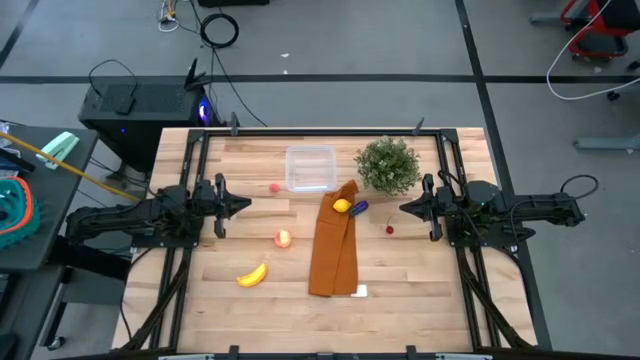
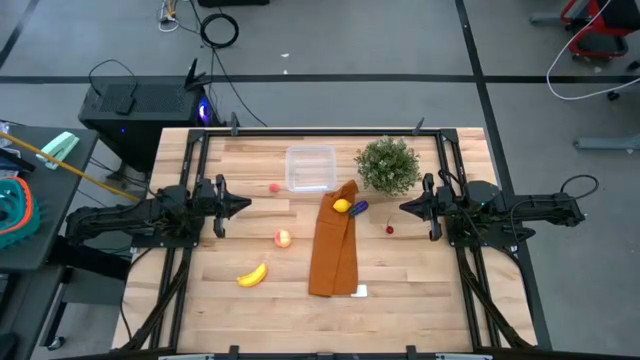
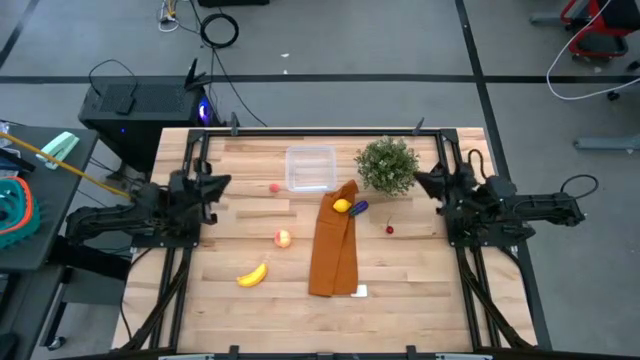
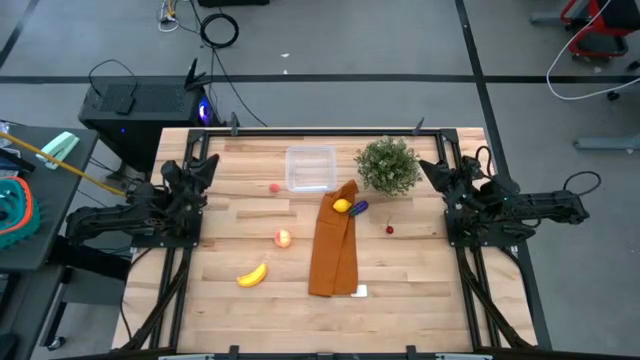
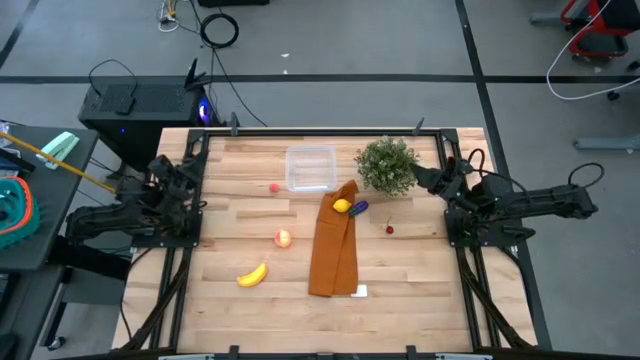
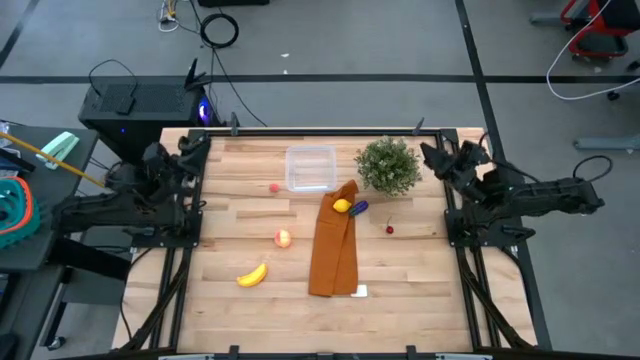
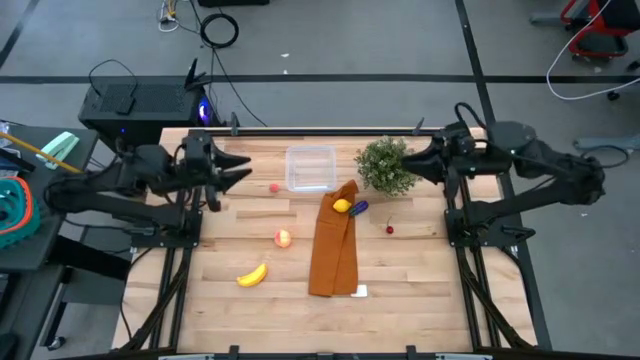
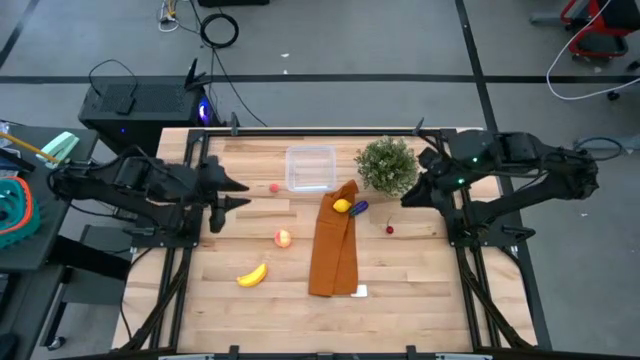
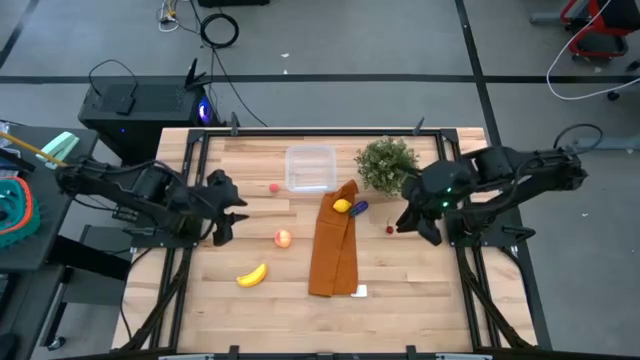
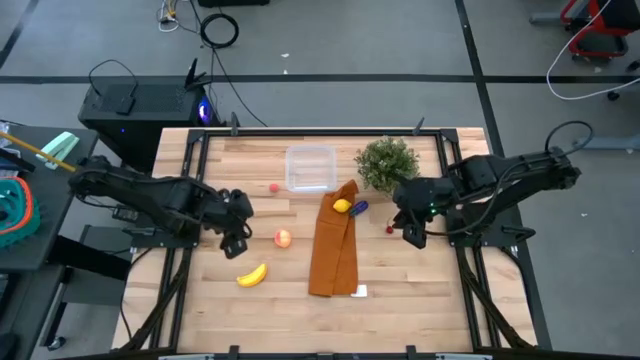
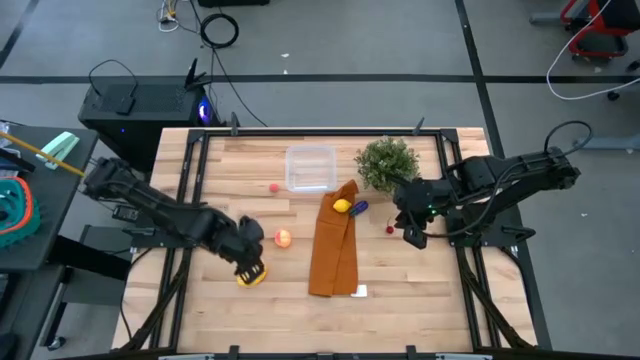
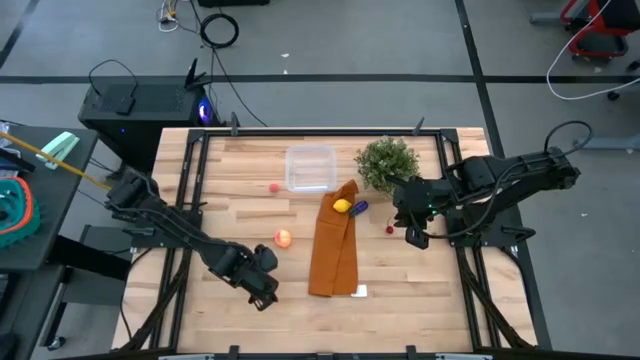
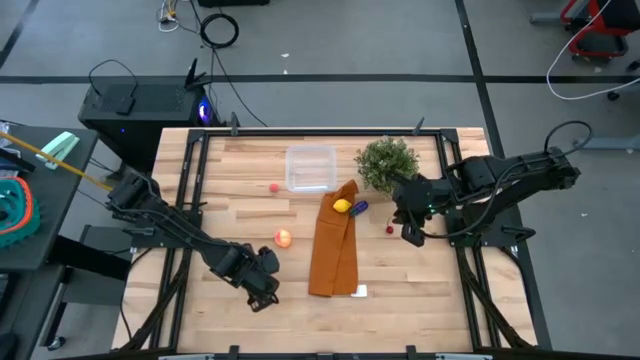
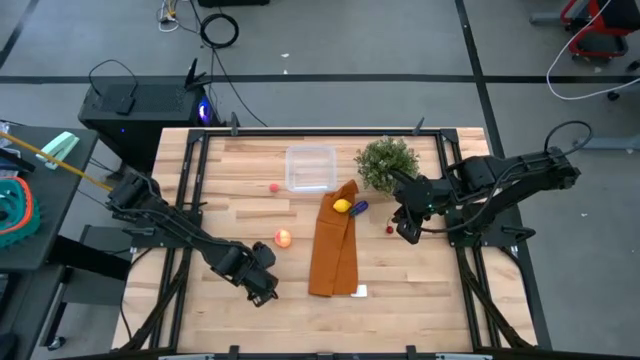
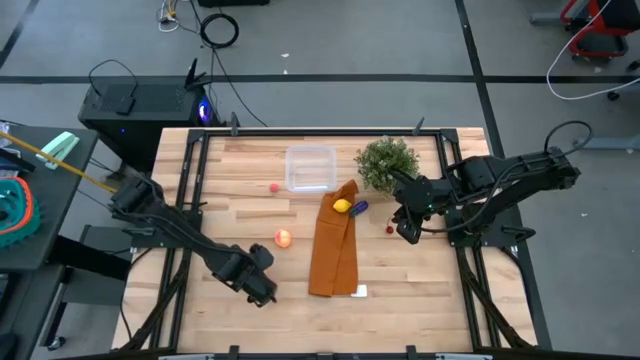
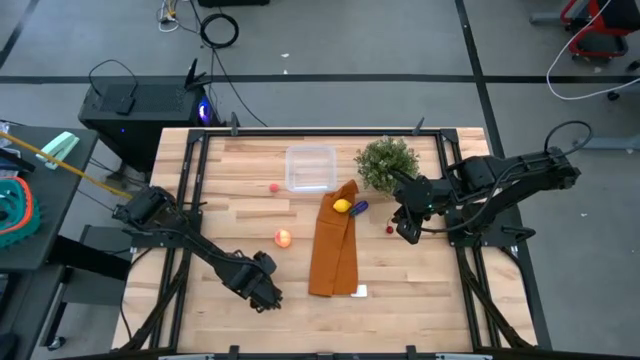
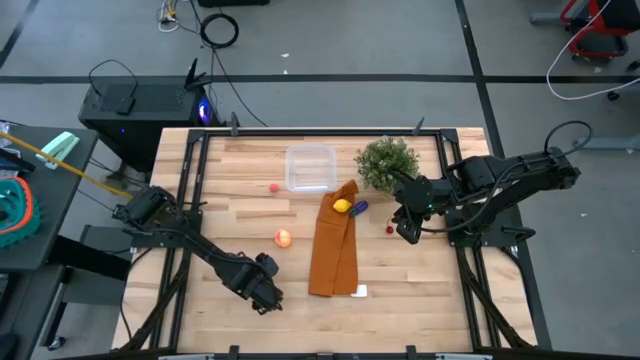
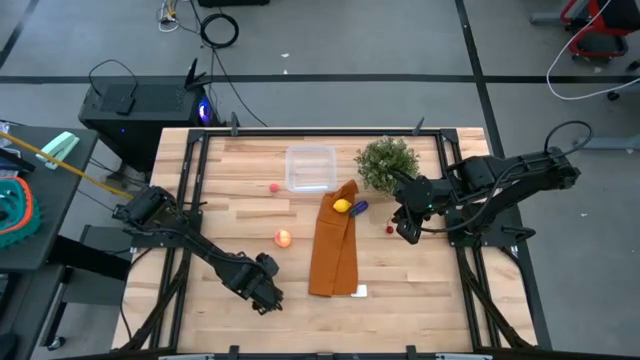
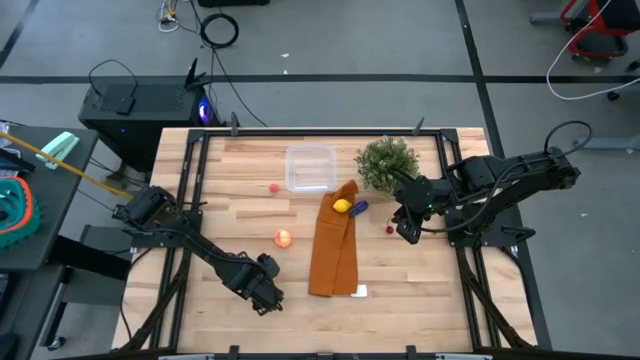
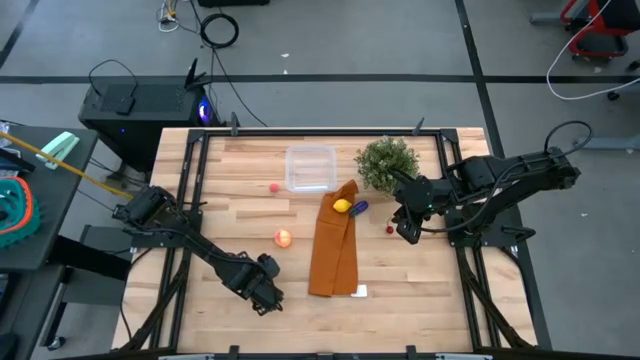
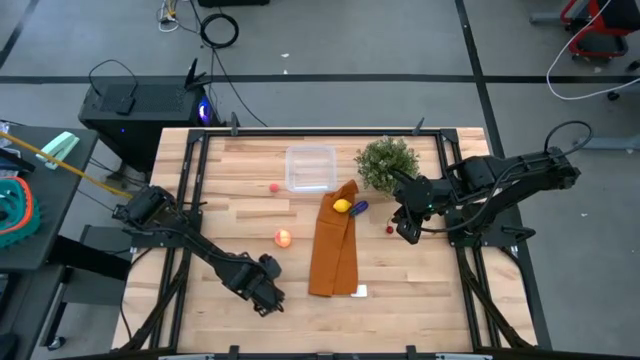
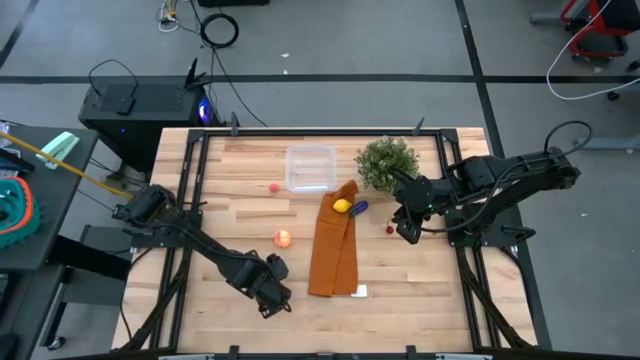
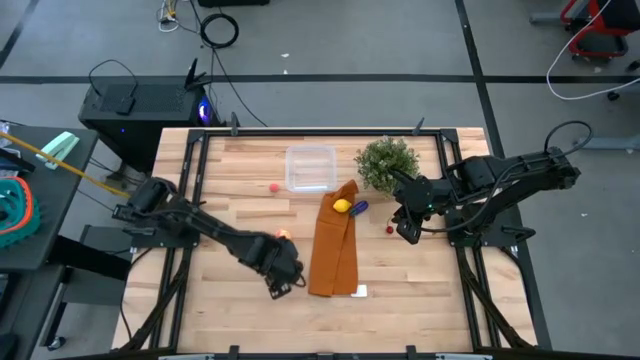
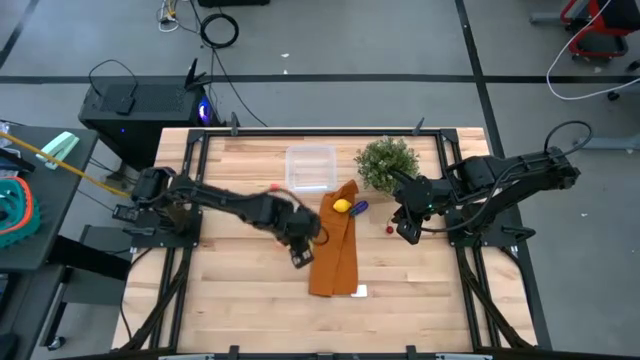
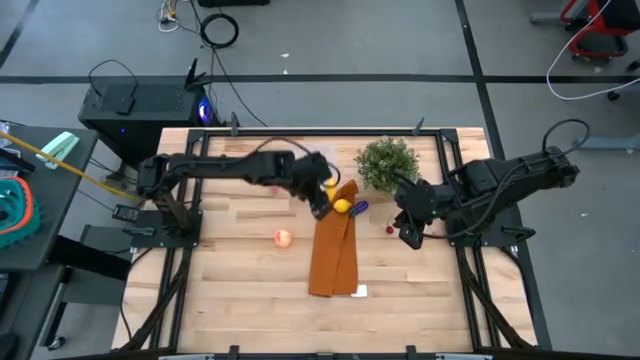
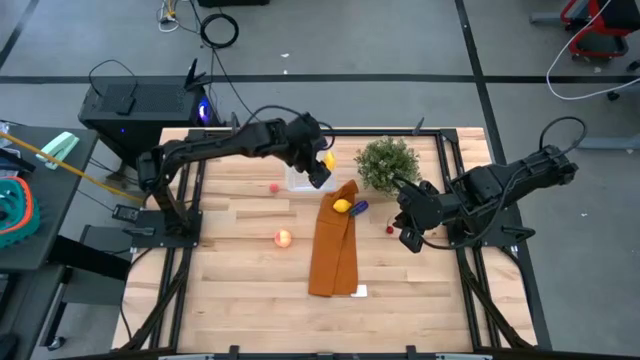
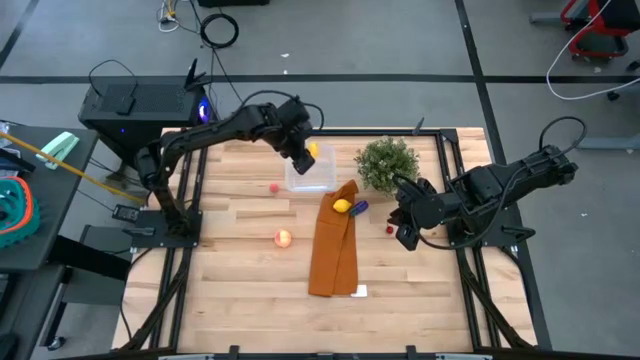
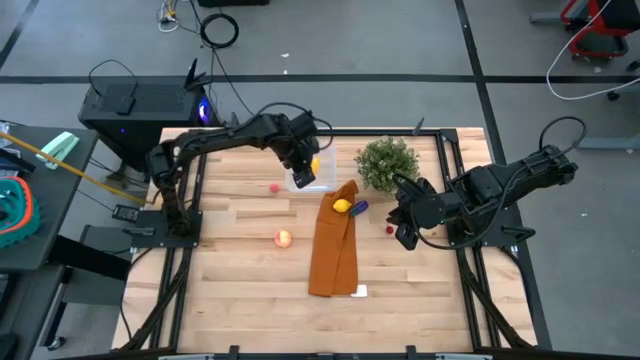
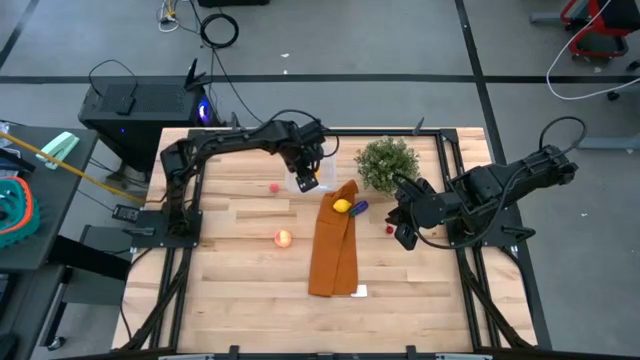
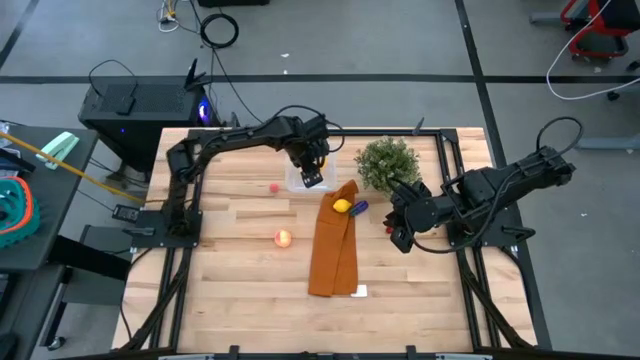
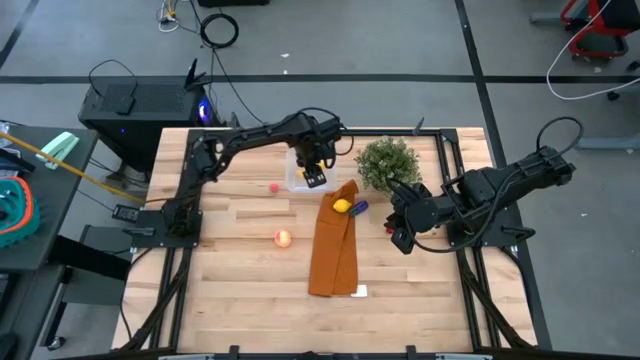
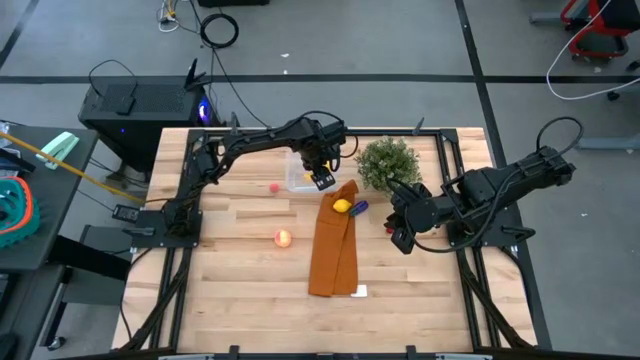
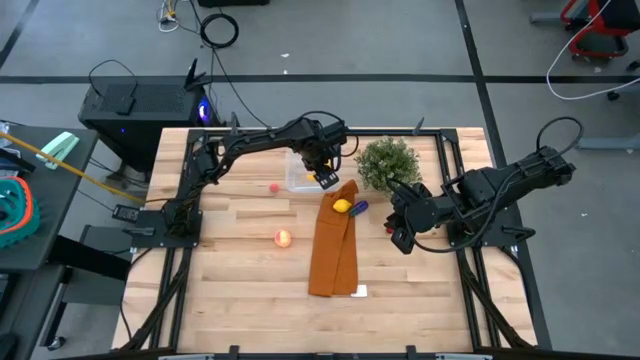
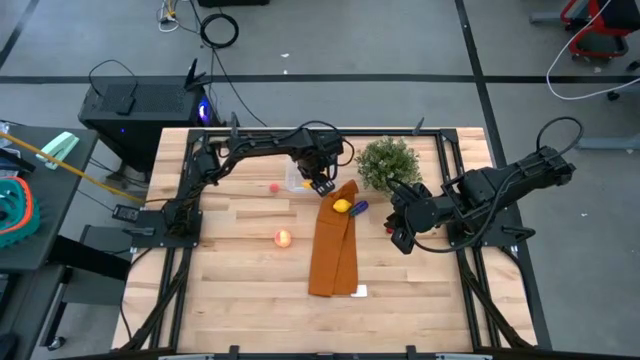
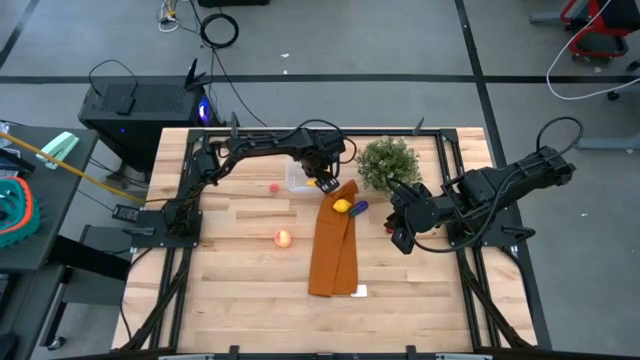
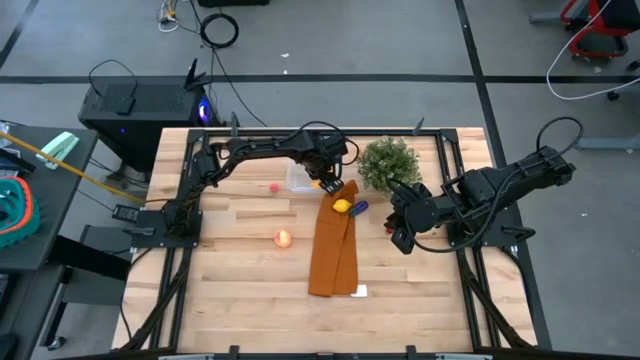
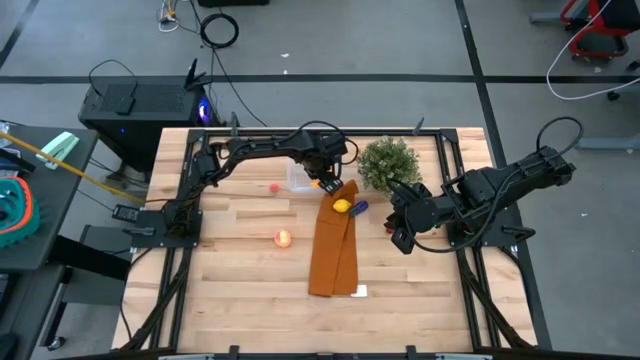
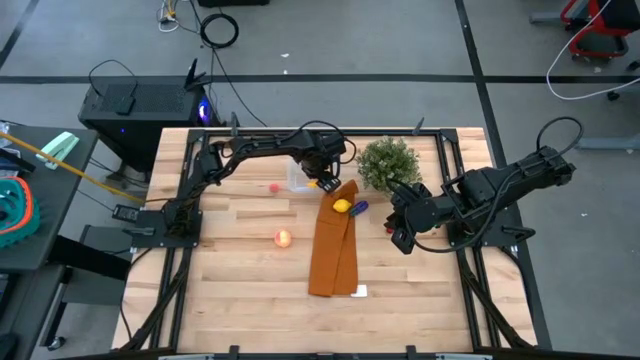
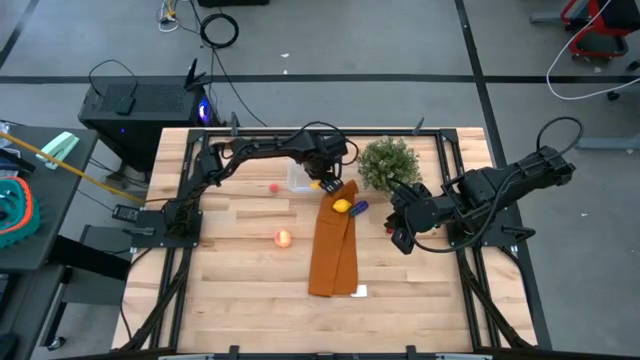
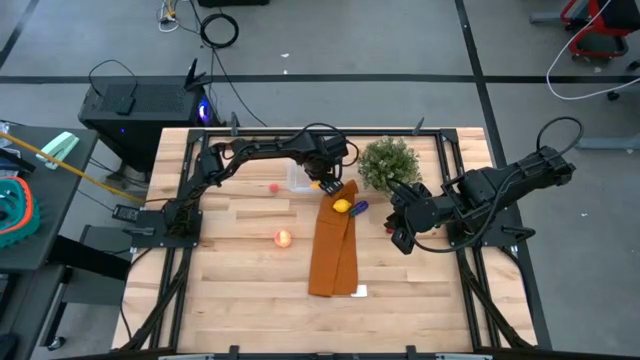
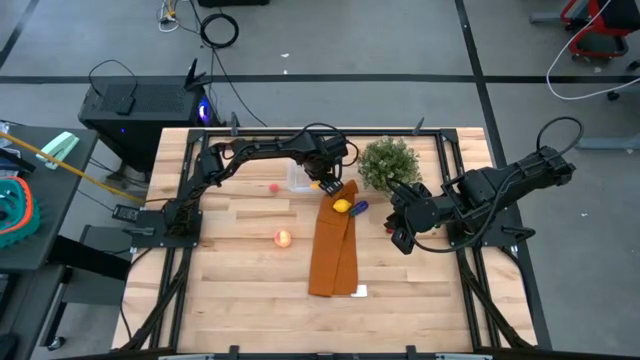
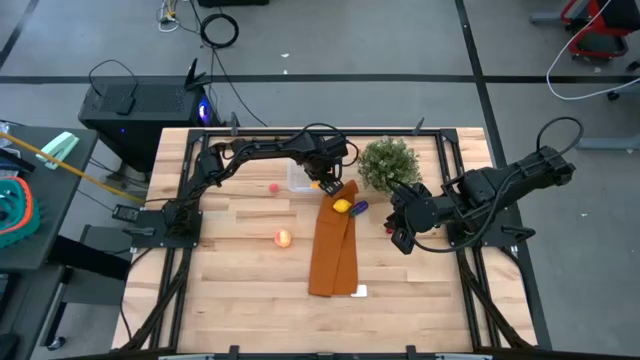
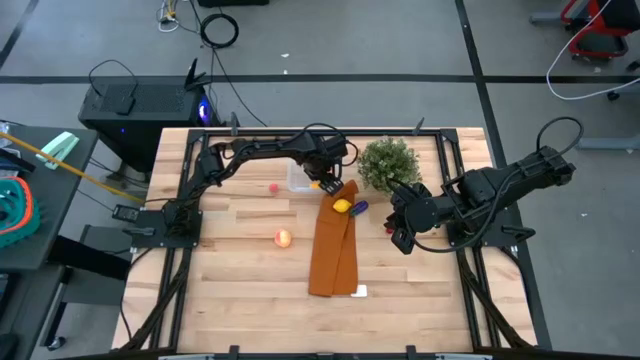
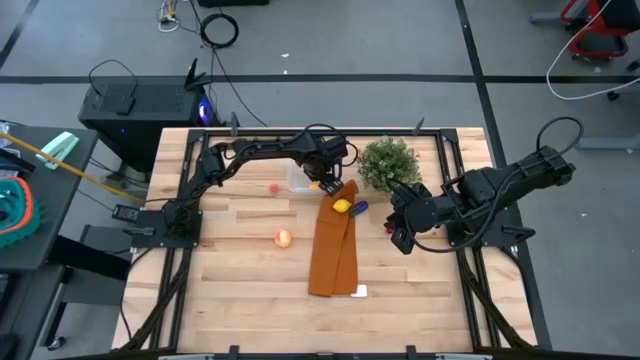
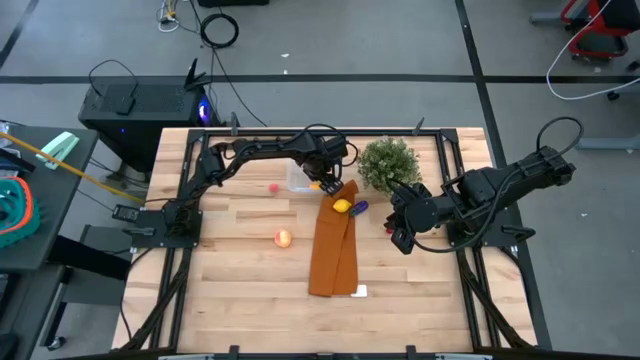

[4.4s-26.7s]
Task: Pick and placing Produce into tupperware
Put the yellow banana into the transparent bin
